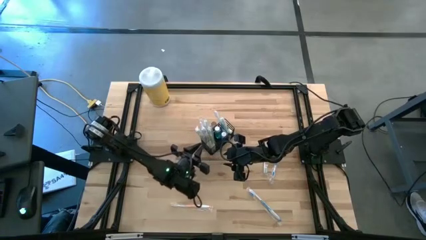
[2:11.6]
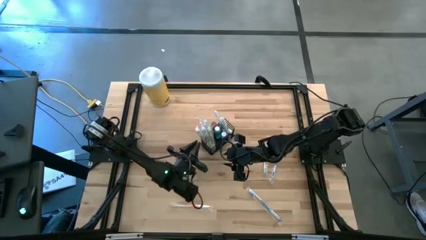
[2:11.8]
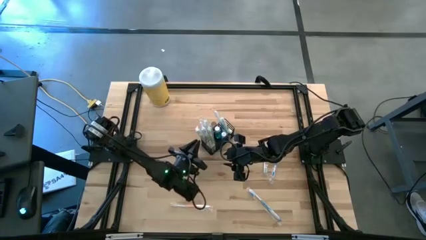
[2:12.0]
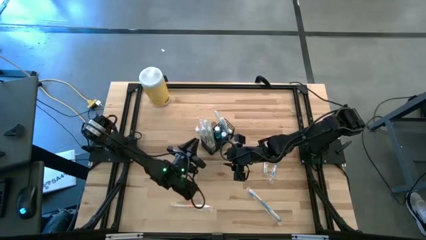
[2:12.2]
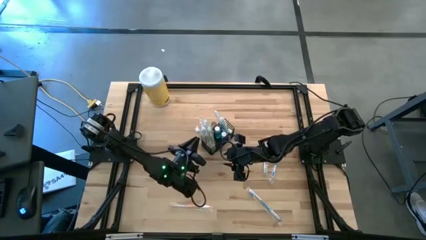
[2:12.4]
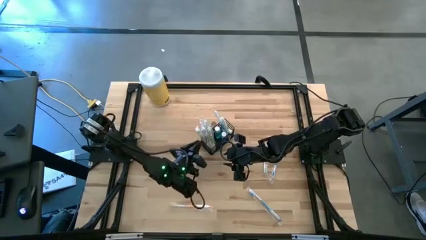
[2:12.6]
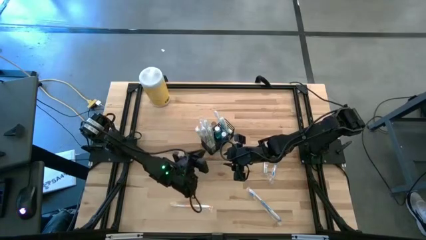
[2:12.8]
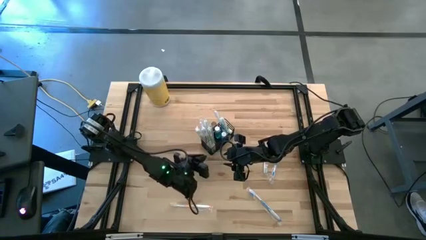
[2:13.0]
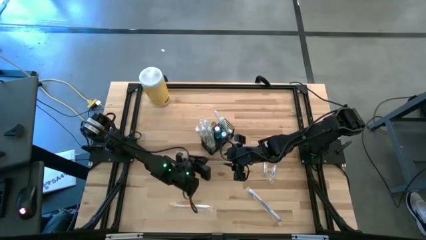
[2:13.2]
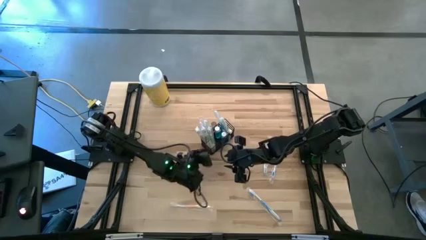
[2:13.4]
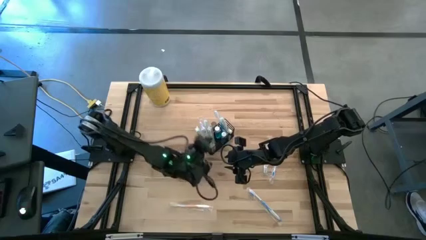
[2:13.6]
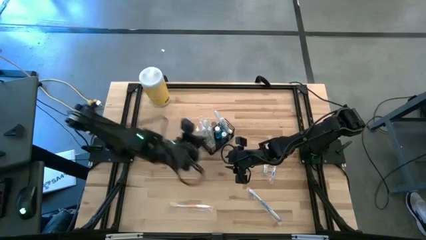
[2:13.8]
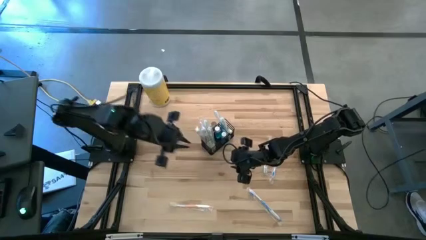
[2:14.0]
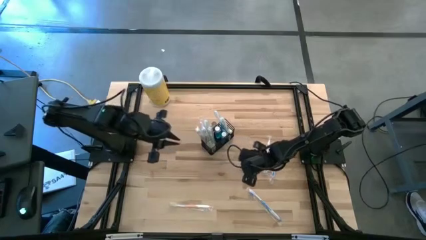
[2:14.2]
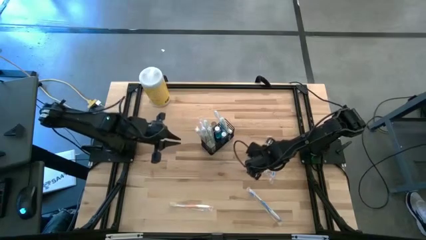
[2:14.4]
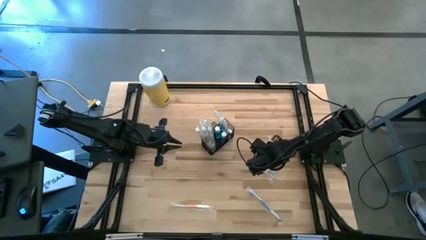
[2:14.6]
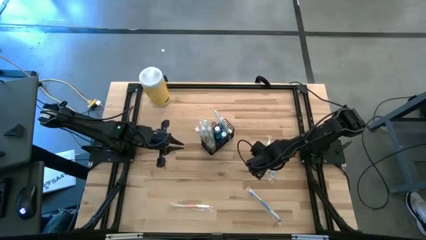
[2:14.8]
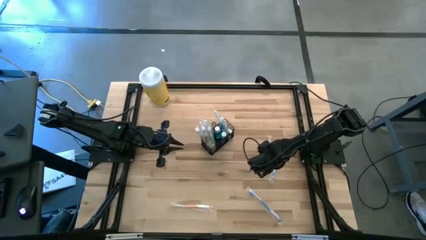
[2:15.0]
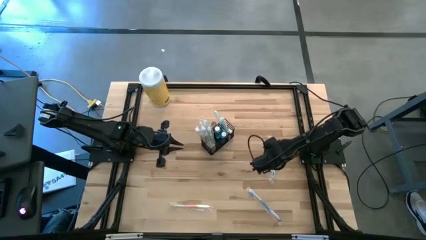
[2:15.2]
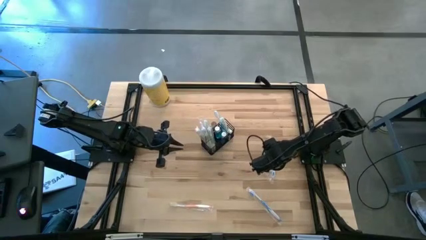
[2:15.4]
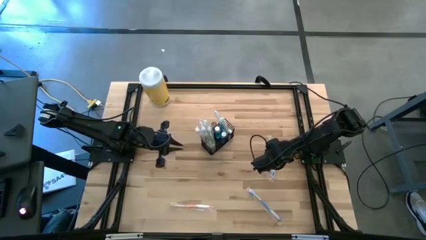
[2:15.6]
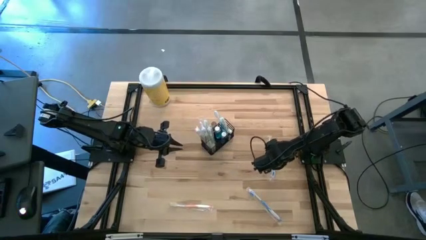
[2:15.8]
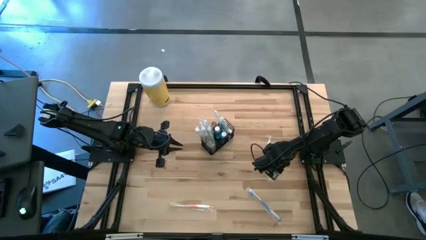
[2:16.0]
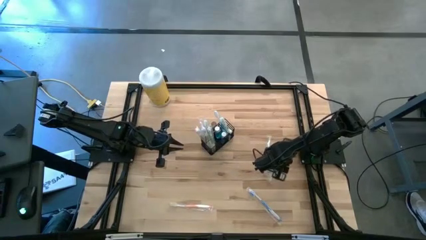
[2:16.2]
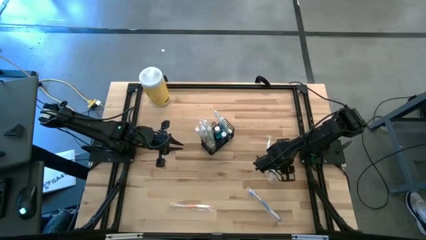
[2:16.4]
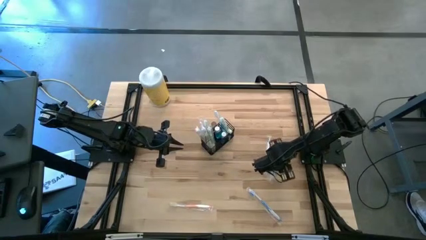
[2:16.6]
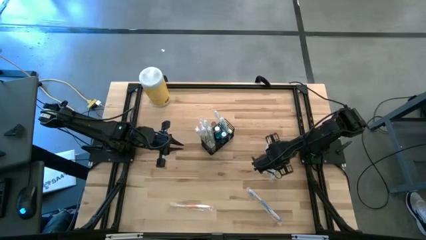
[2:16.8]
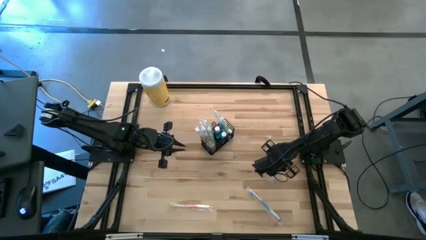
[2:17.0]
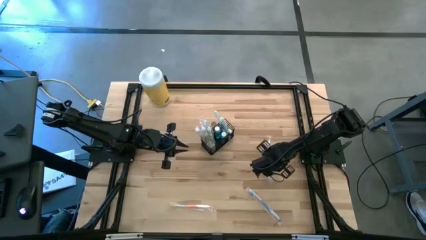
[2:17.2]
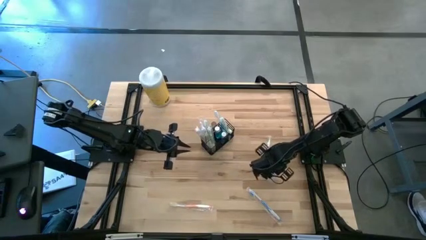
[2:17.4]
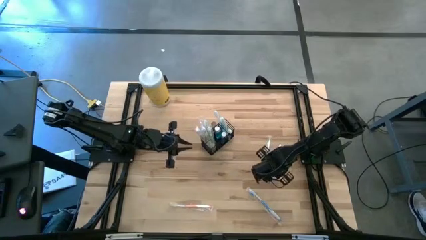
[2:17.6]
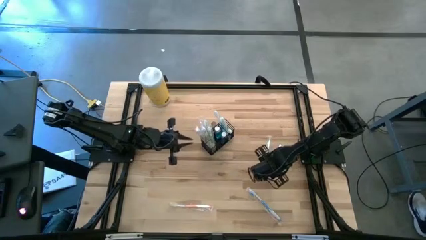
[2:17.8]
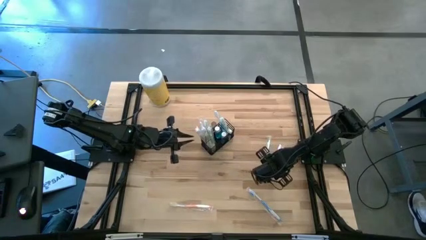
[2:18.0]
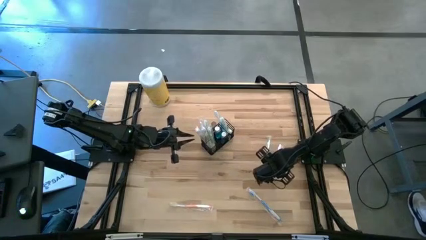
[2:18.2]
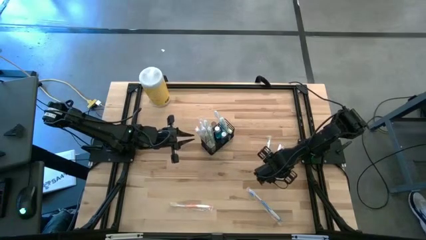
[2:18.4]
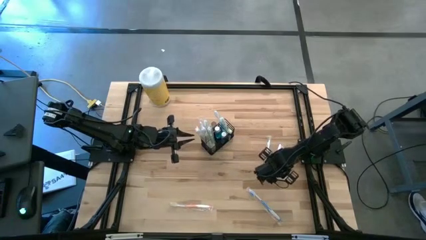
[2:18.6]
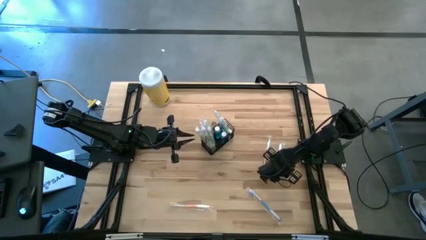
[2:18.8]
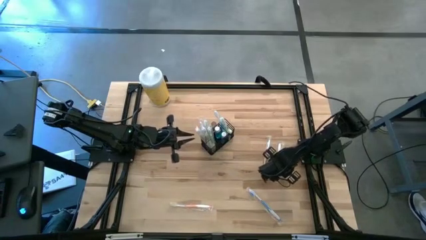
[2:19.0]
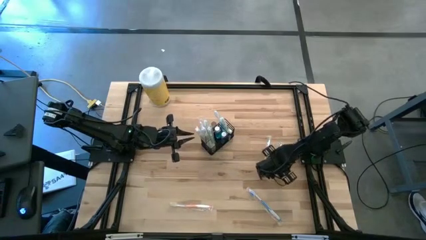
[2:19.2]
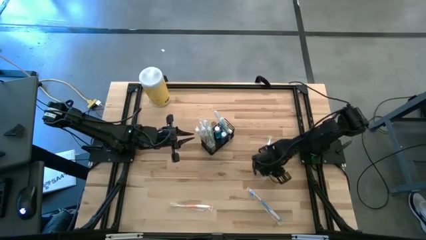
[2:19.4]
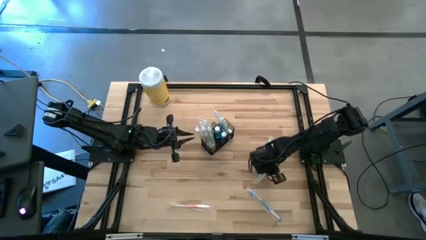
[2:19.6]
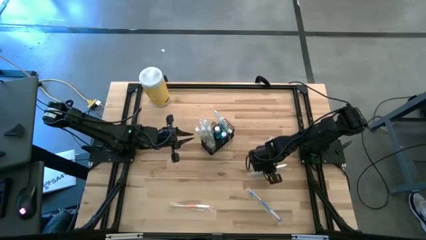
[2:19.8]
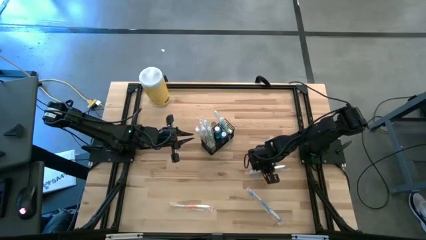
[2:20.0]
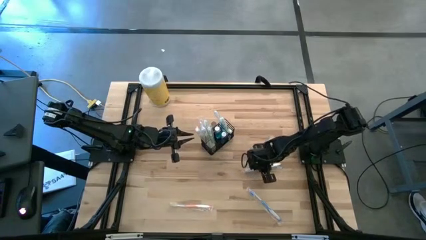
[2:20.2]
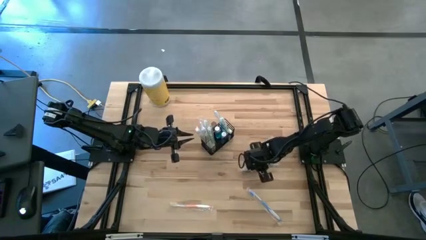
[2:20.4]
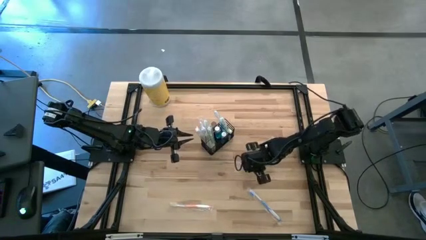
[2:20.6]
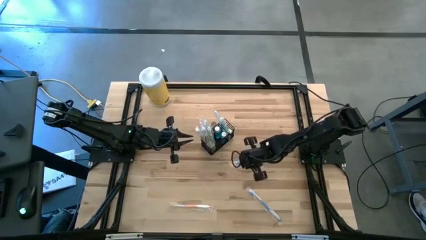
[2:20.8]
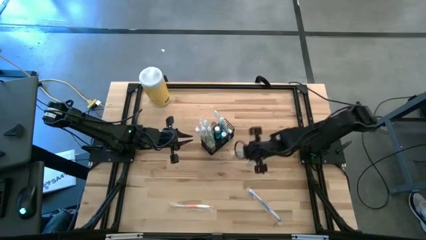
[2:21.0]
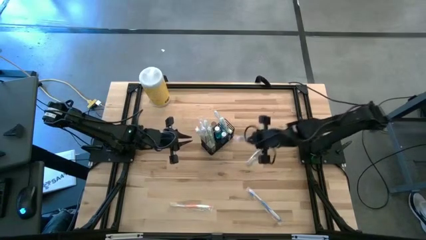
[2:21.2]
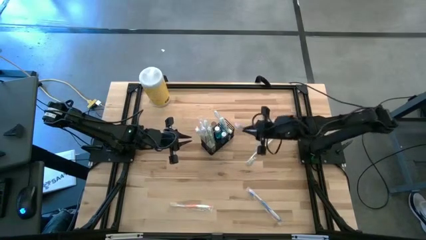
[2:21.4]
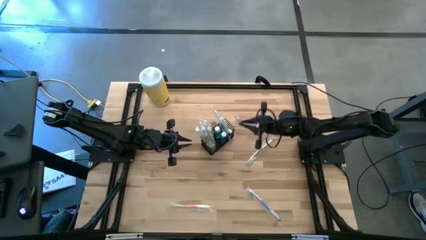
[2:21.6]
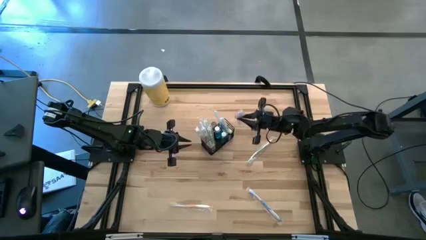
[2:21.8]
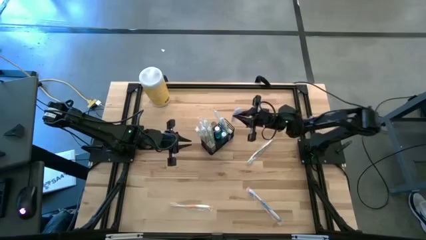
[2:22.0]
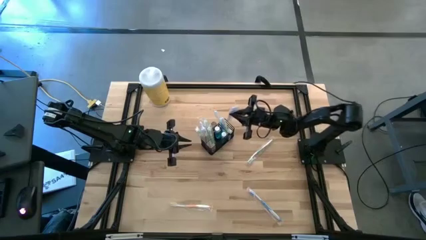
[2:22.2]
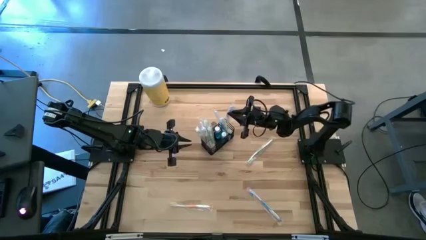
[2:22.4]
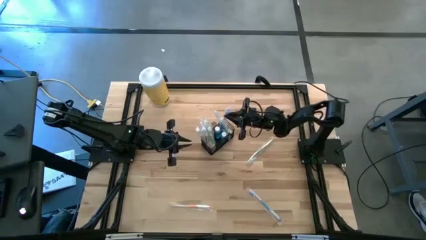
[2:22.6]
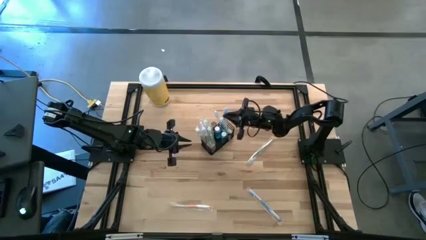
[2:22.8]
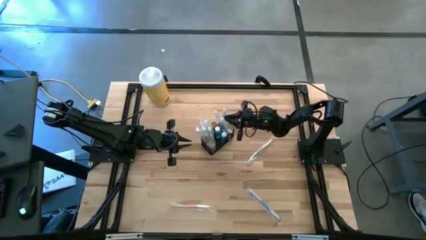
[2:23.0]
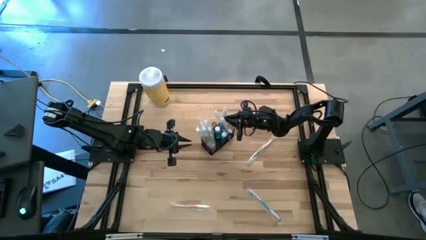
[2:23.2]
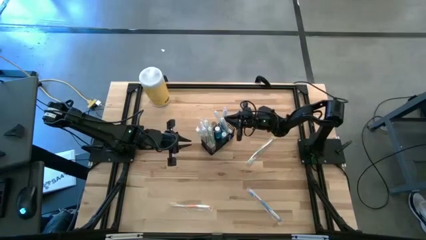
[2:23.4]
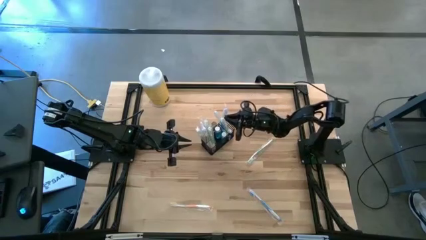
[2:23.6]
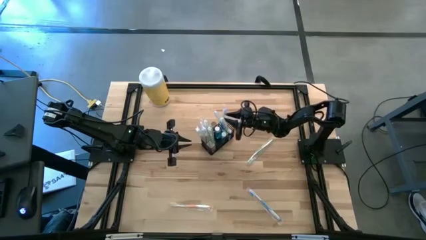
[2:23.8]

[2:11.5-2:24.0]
Task: Pick & Place toothbrushing station
Put the blue toothbrush into the wire organizer

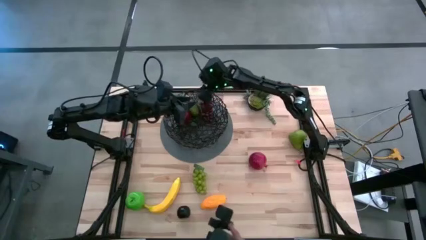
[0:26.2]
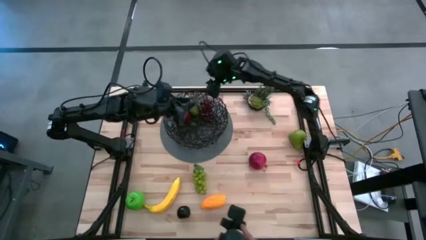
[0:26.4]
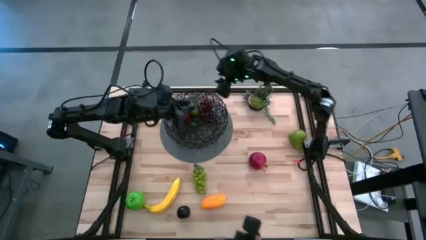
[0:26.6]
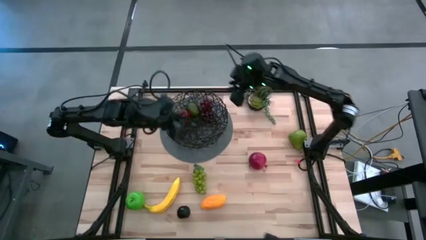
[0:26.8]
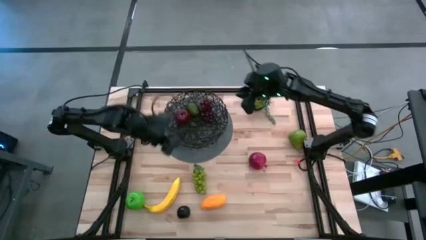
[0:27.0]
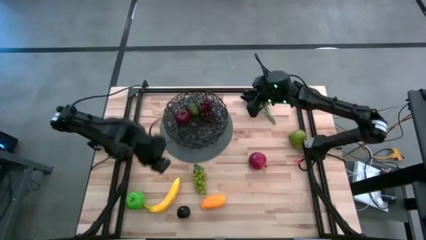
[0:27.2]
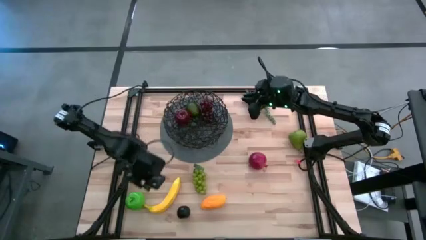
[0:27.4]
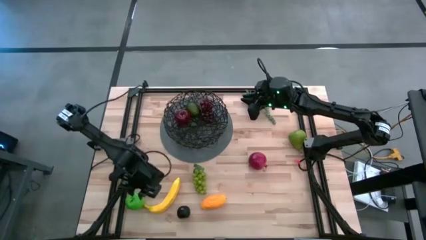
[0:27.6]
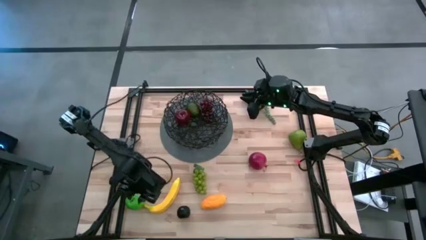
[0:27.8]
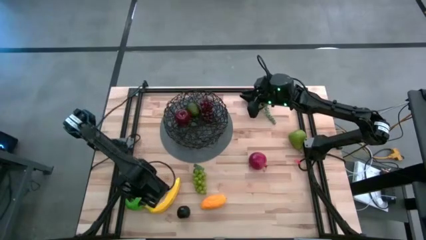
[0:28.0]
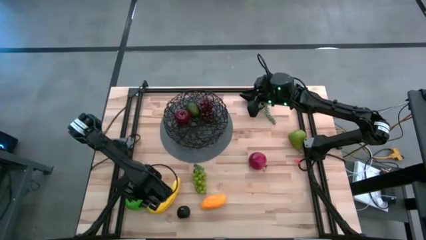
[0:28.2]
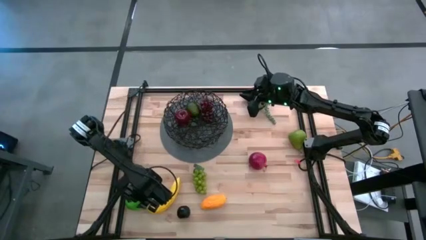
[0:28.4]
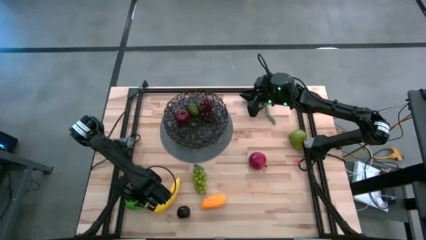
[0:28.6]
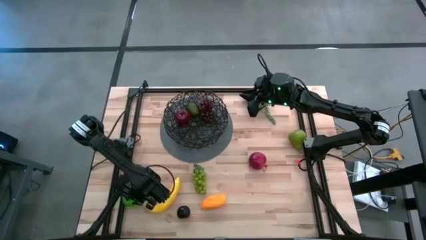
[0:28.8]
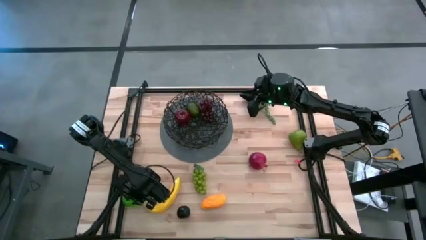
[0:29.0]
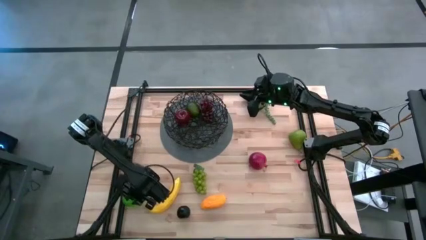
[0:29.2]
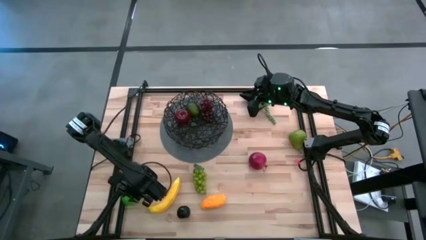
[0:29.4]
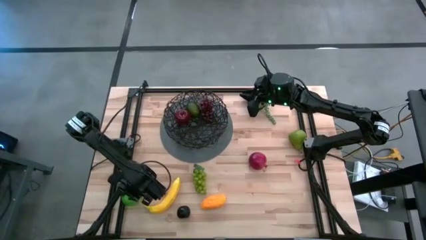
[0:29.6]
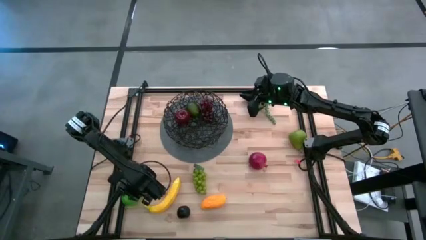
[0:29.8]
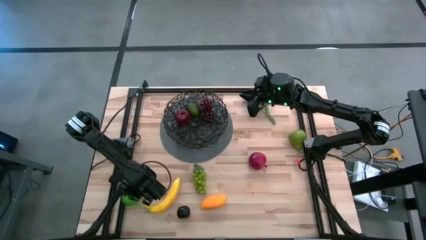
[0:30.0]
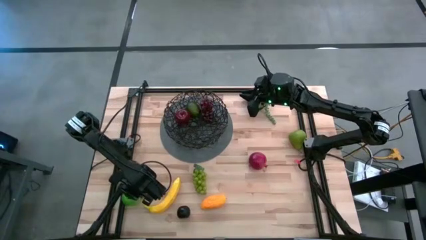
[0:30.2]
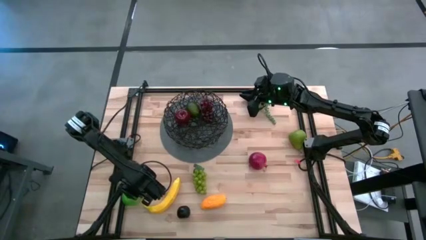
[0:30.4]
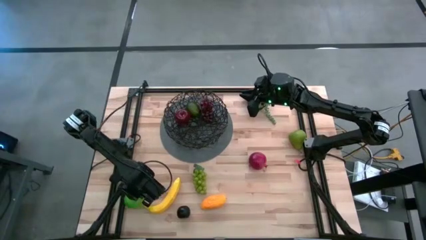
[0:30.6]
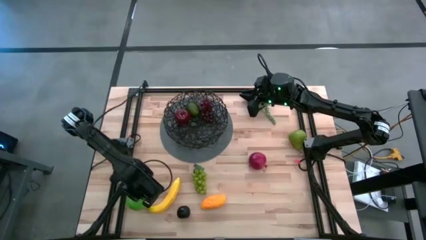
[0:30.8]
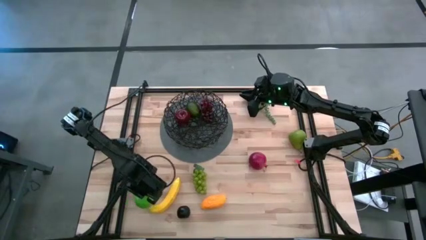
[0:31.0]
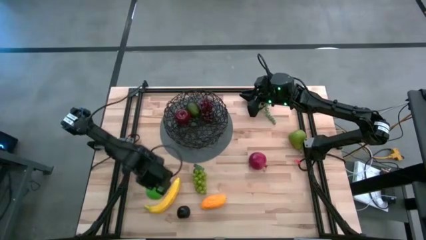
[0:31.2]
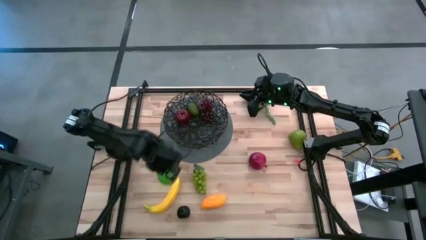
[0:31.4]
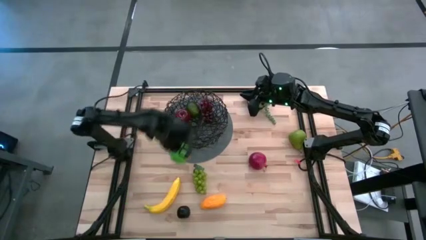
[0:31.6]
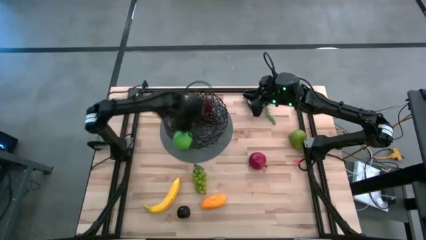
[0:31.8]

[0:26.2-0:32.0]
Task: Build produce basket
Put the green apple into the black wire basket
